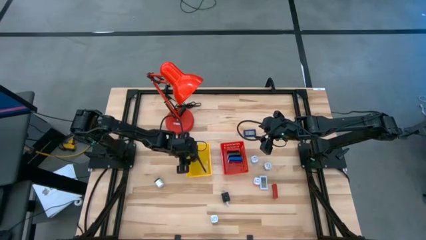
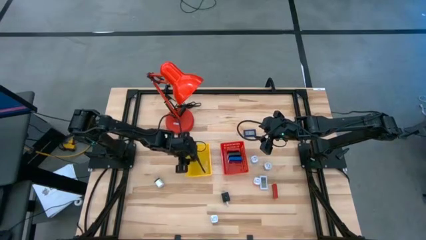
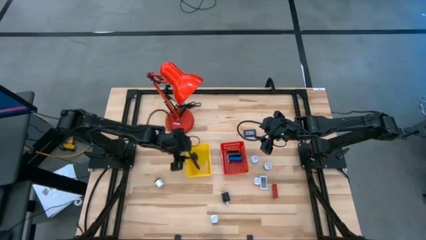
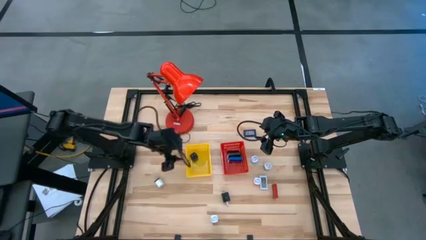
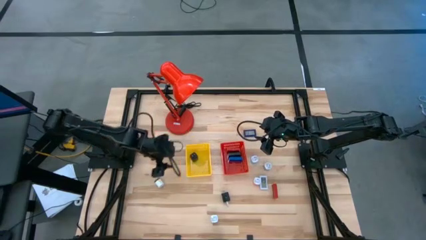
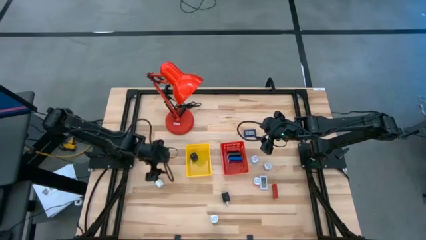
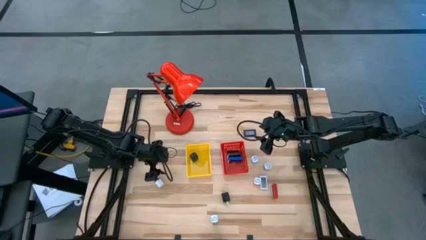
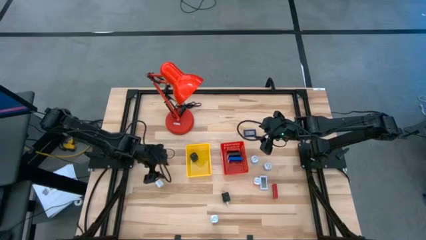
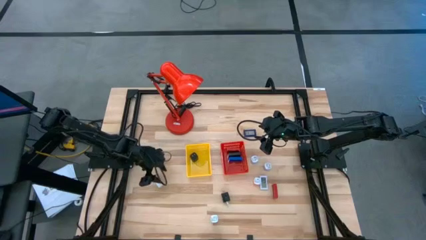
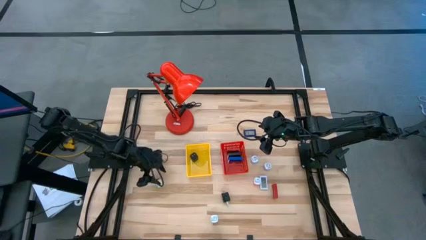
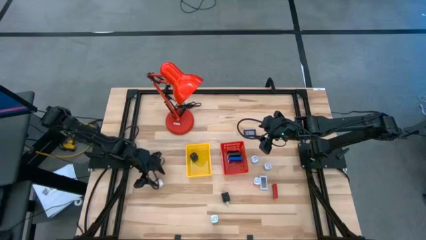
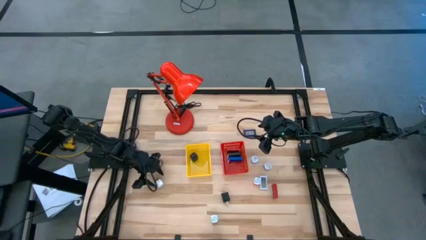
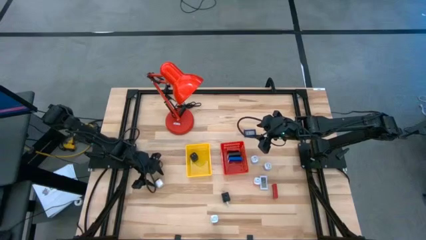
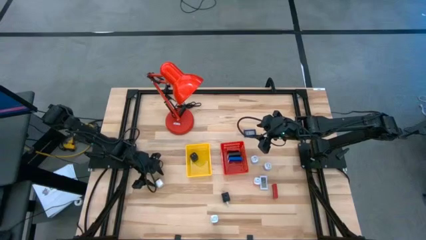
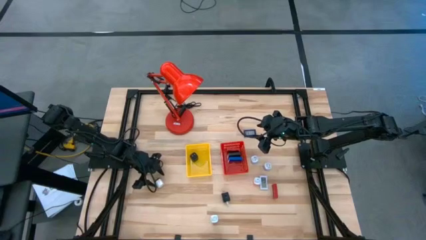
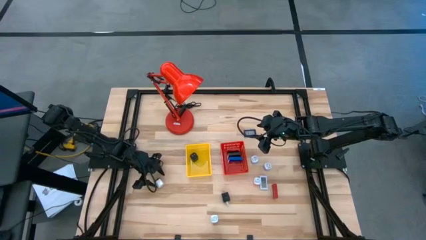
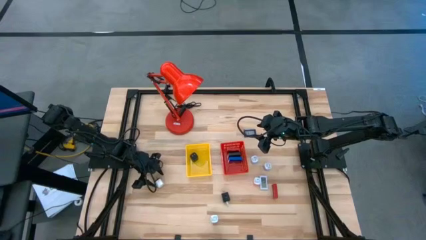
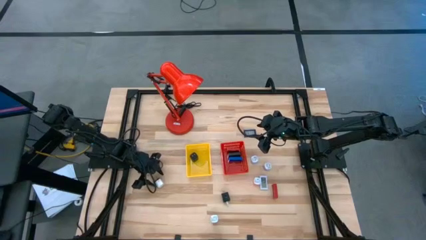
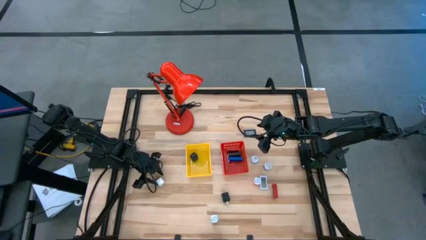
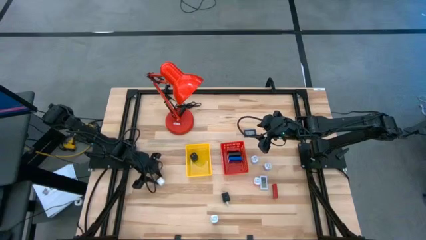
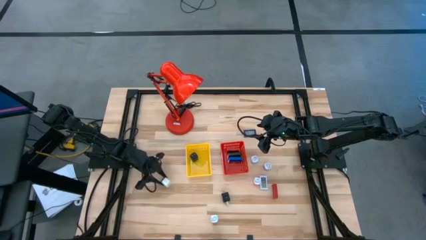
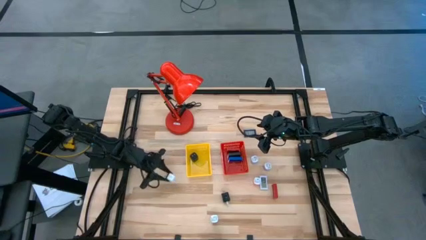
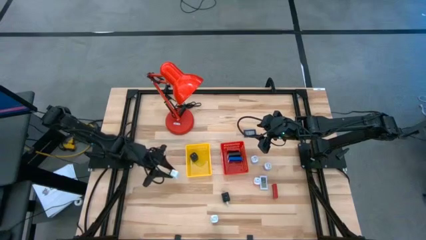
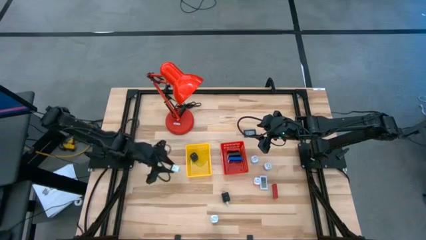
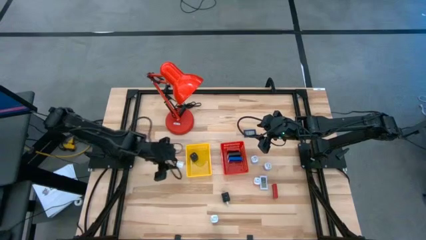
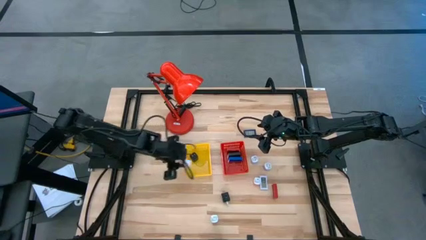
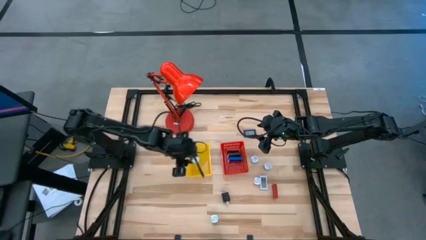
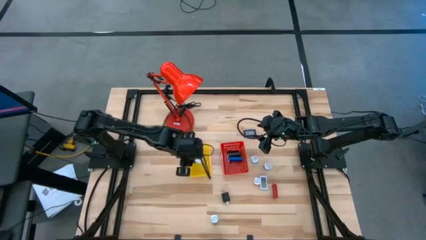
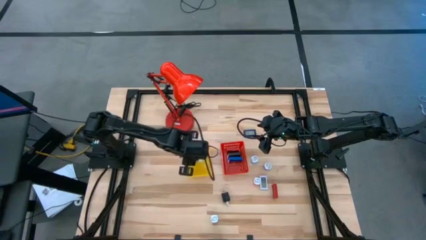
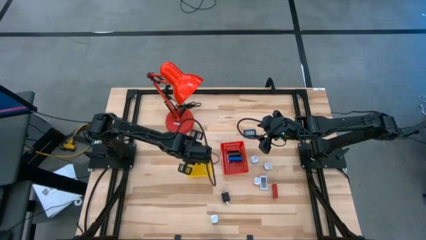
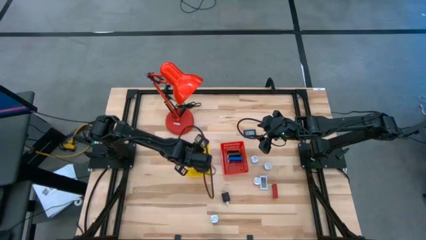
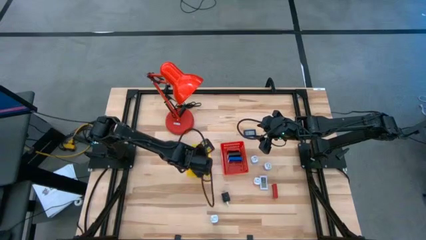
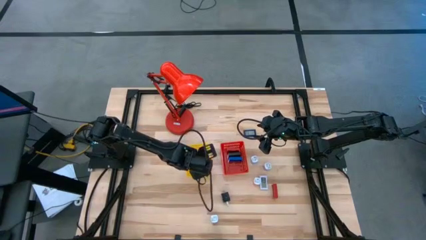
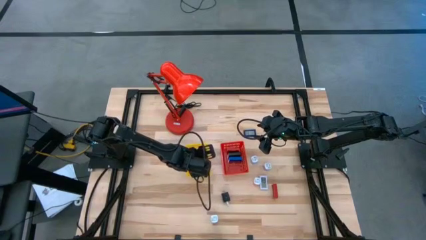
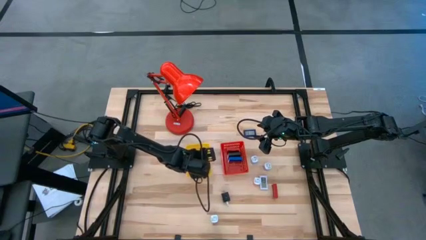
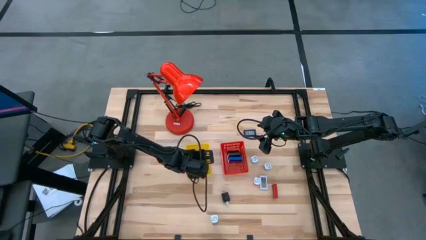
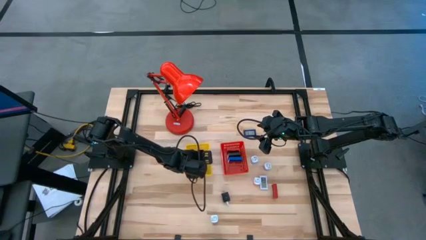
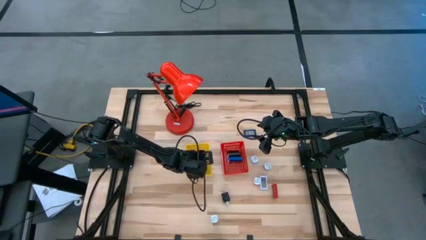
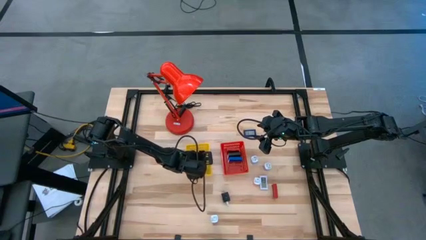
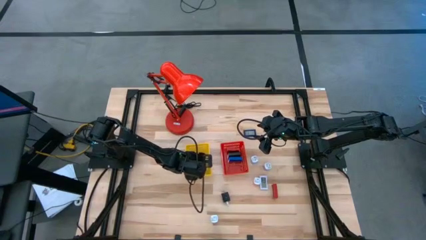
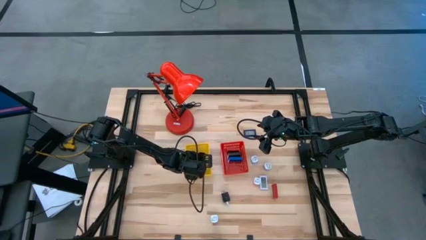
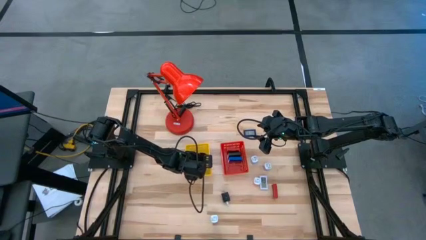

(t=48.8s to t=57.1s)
Task: Pick & Place Office items
Put the white charger adapter into the yellow bin

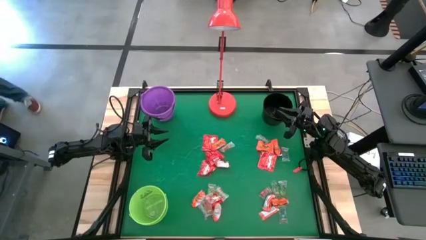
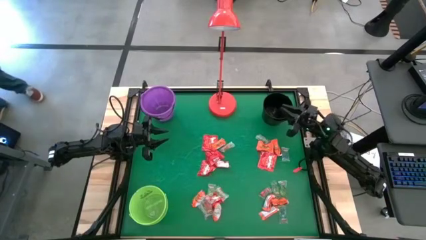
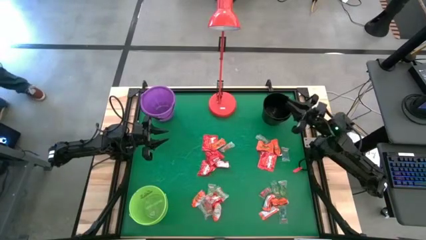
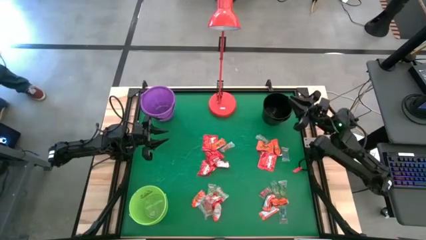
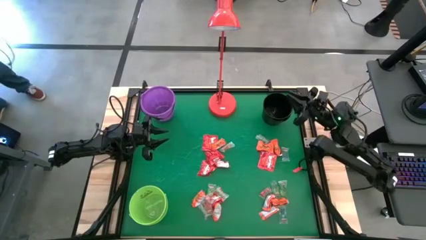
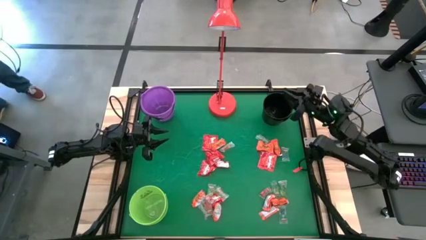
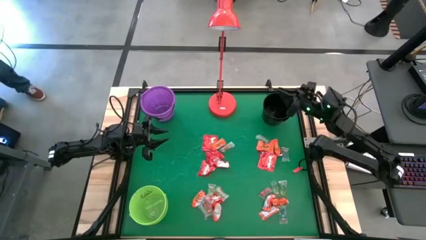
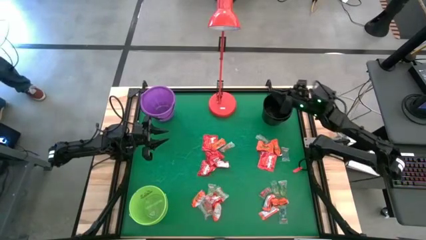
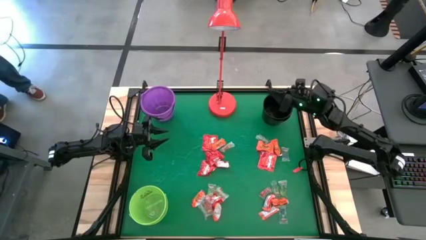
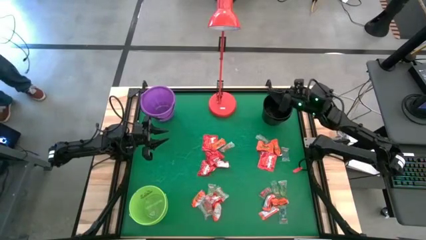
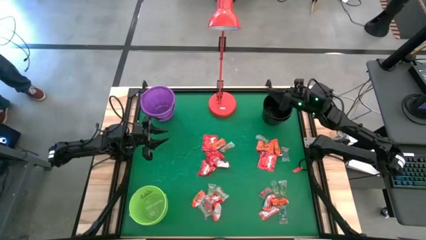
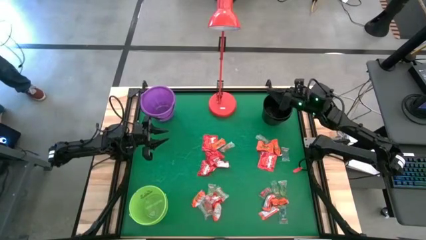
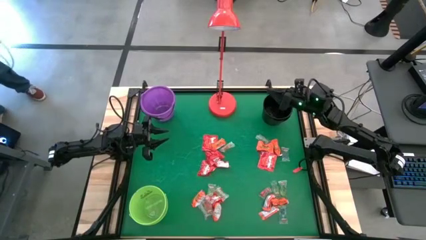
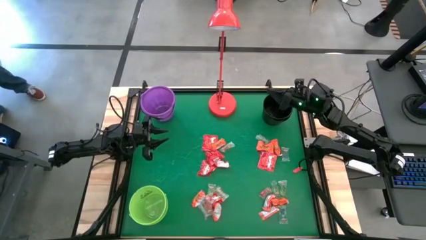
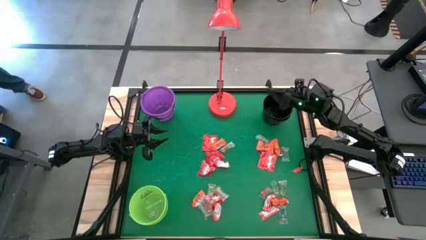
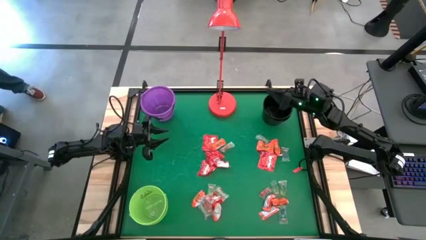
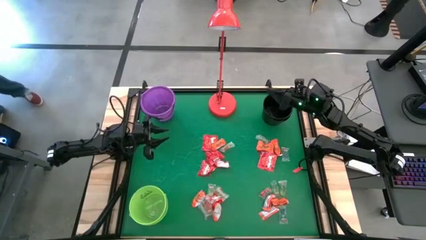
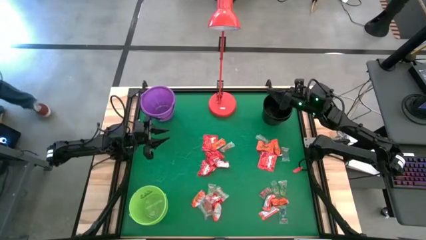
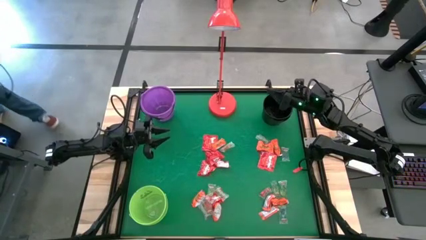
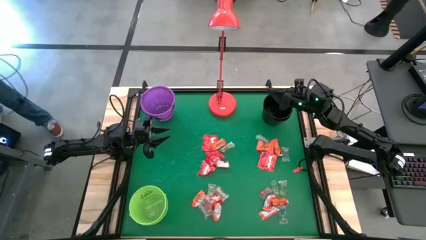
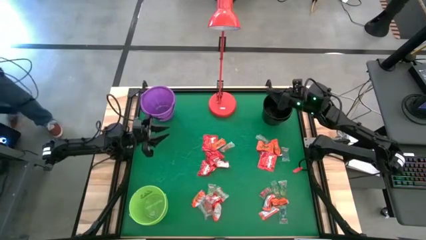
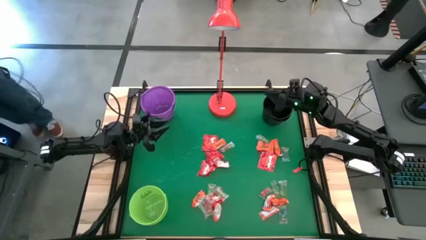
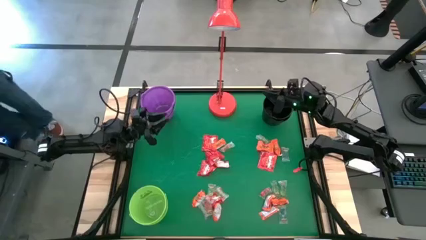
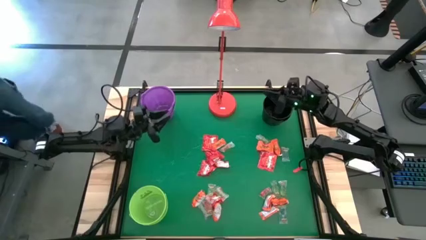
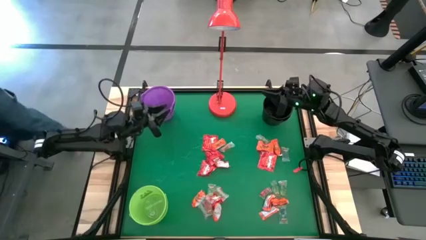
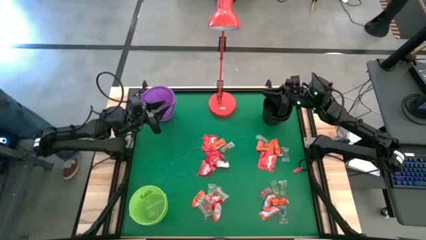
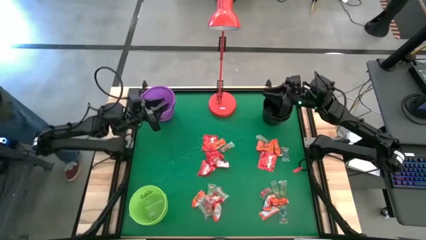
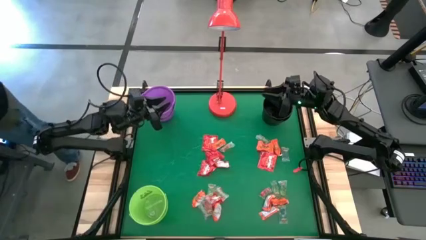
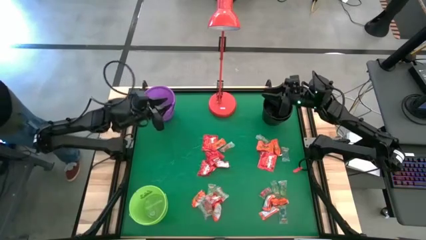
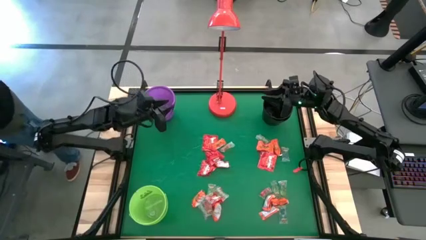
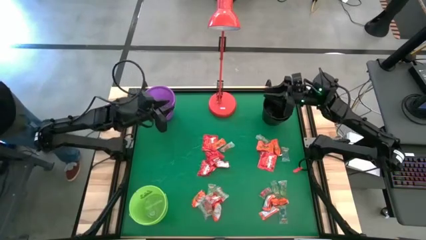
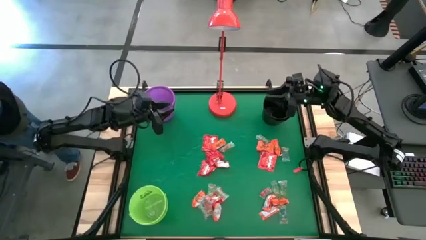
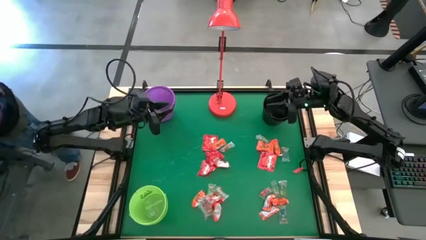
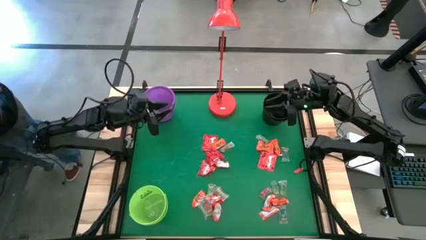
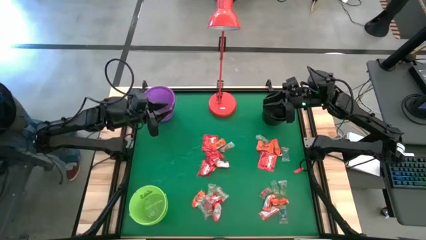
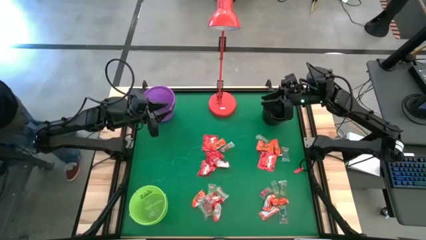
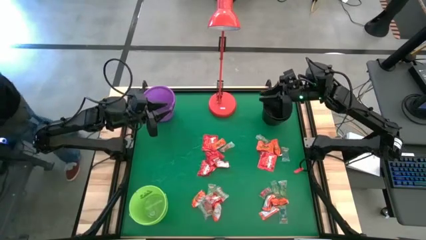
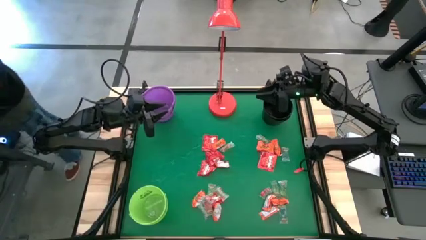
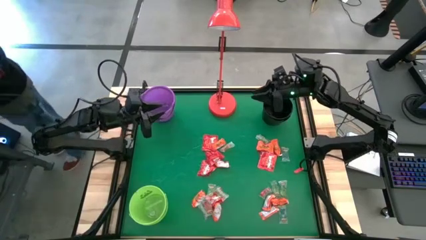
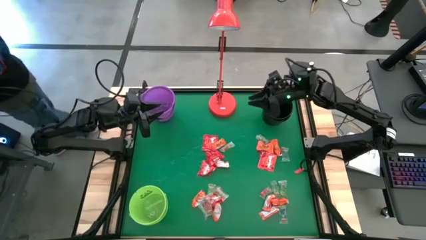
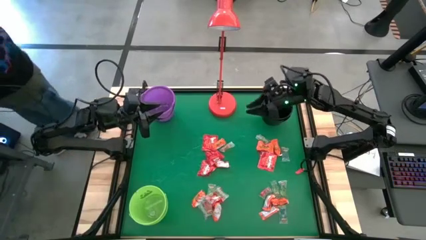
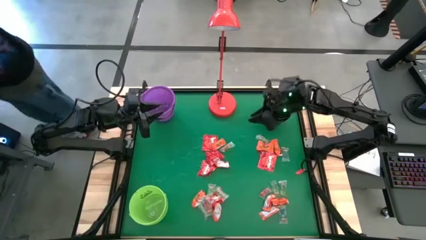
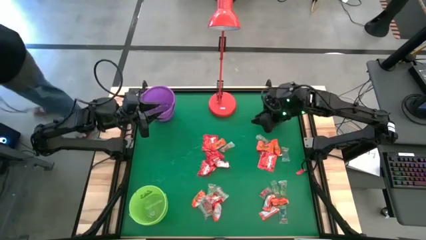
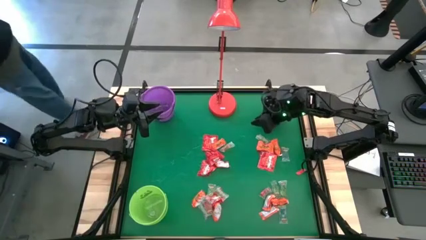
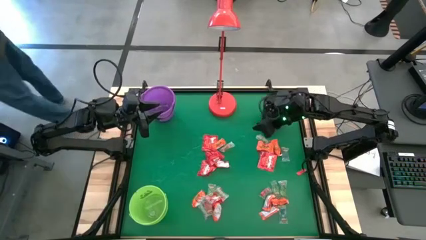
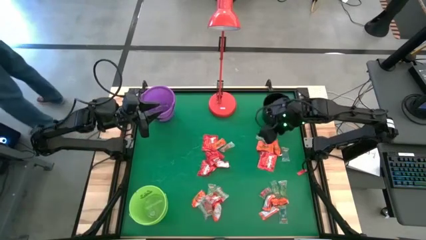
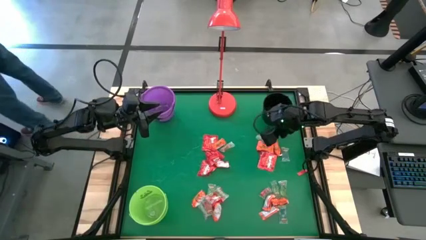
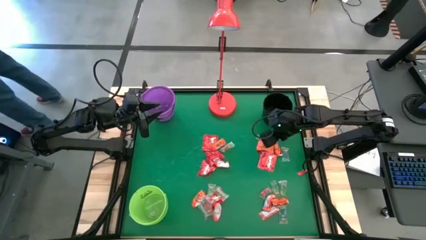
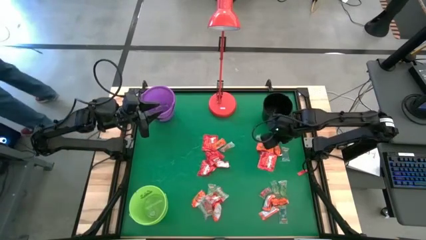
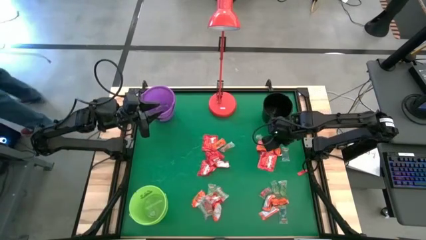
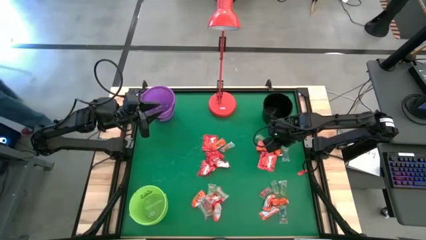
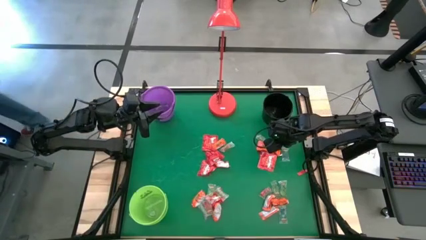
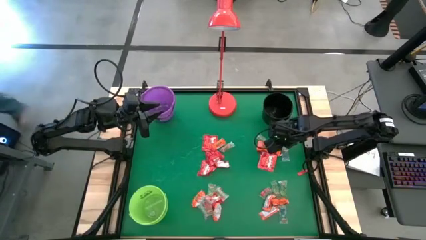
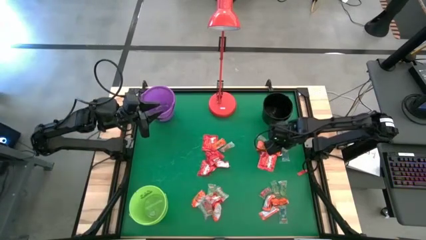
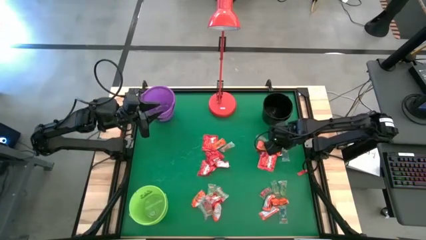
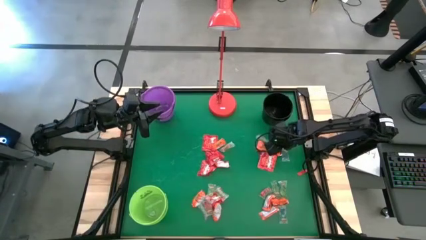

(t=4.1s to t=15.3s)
Task: Sort candy
Put the orange chocolate into the black bucket
